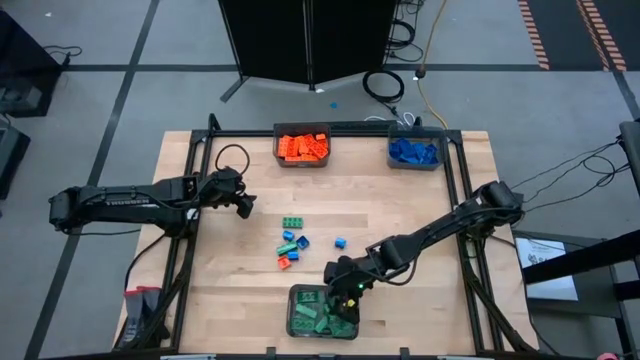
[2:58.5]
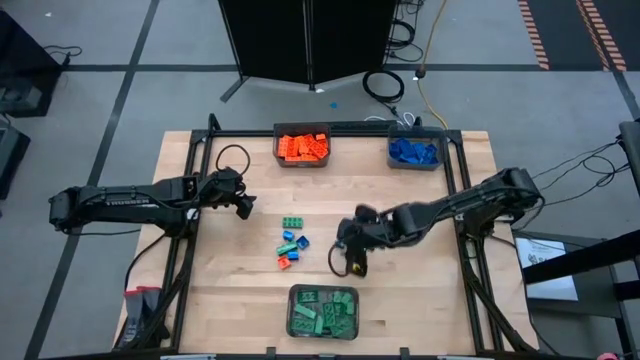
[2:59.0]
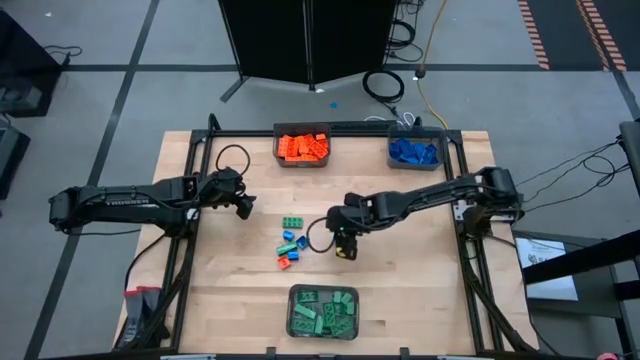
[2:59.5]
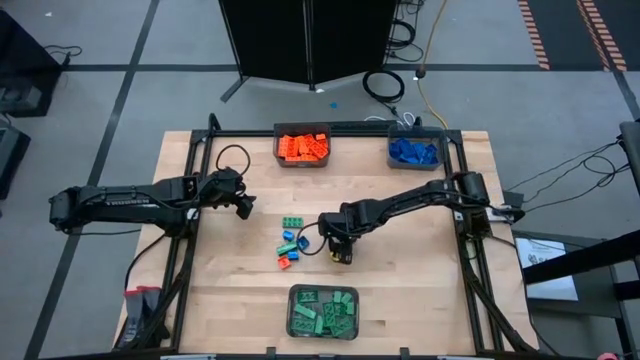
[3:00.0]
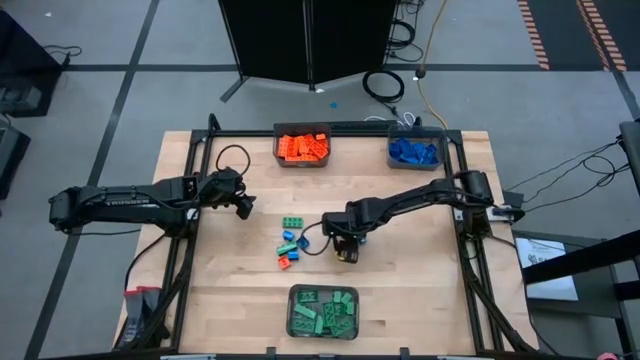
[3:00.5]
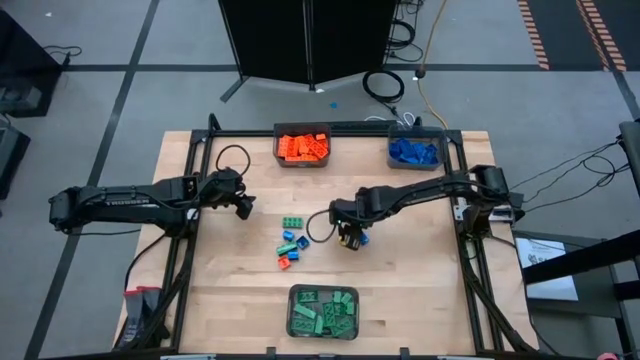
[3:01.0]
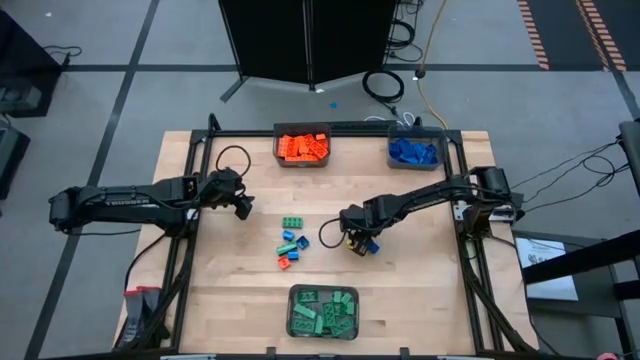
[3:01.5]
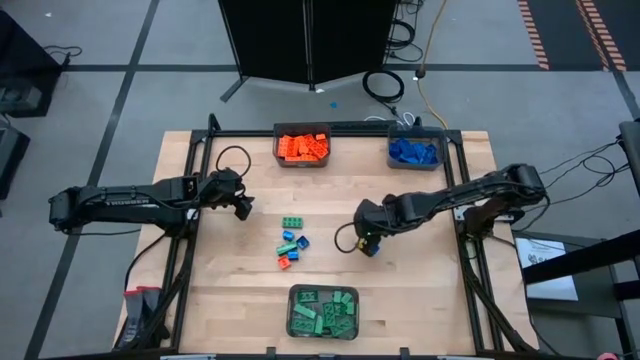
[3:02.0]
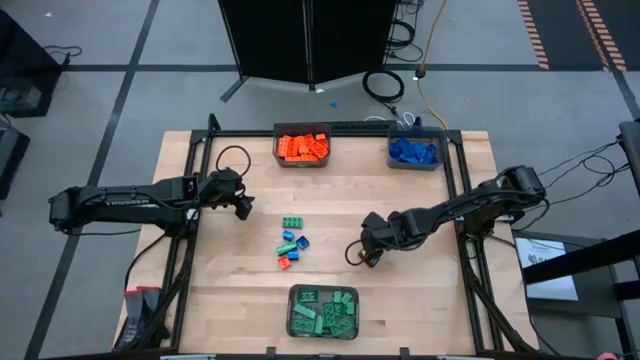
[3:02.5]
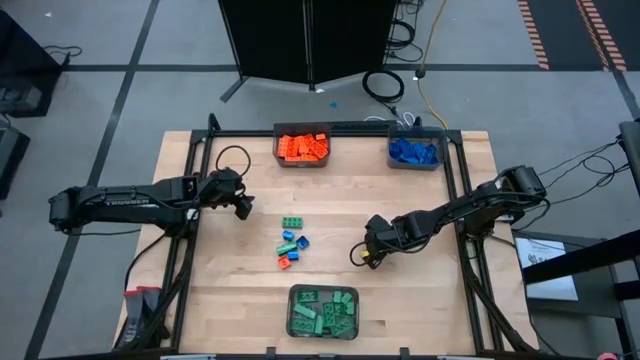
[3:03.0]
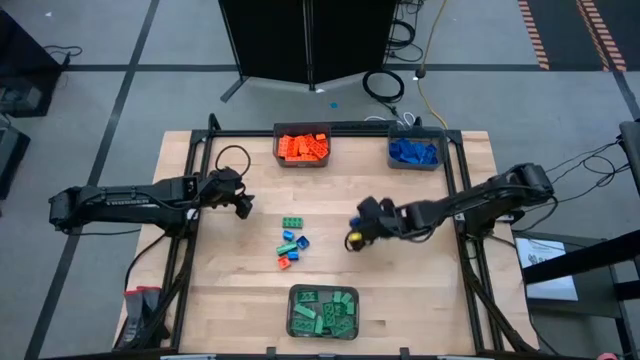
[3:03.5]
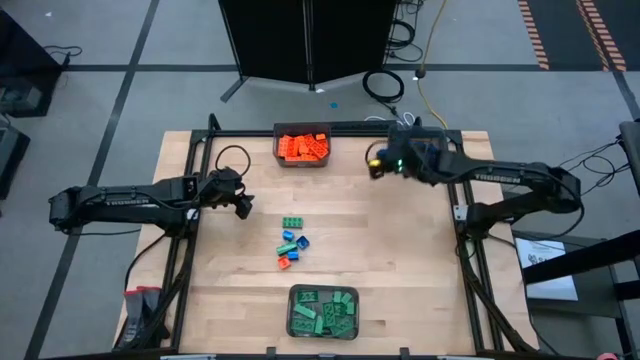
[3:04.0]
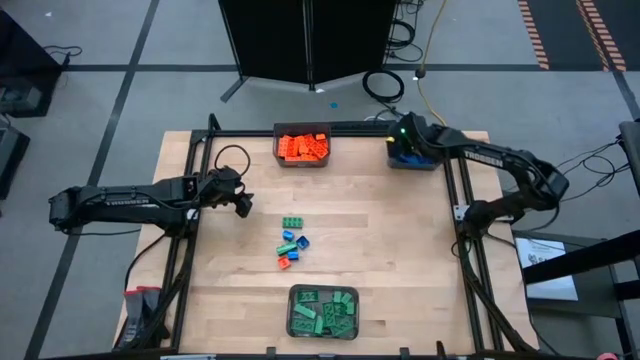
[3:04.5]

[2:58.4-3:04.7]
Task: Sort blocks
Put the blue game piece into the top right black bin

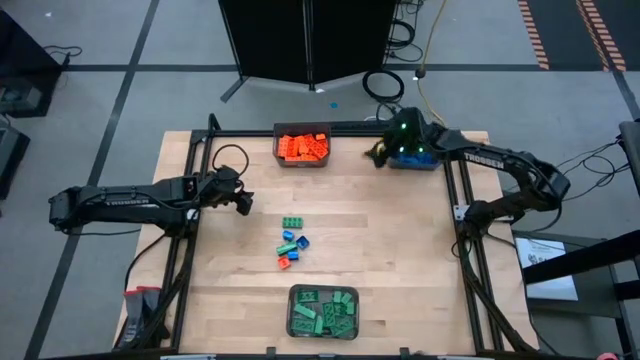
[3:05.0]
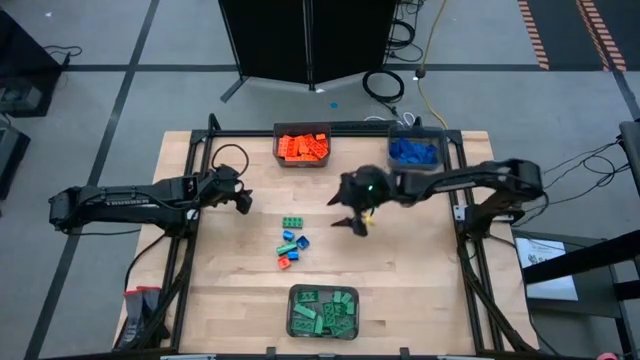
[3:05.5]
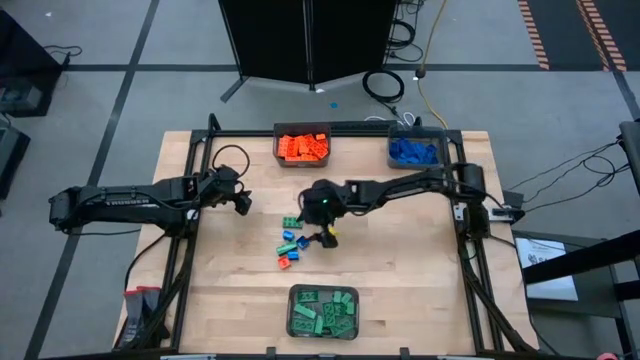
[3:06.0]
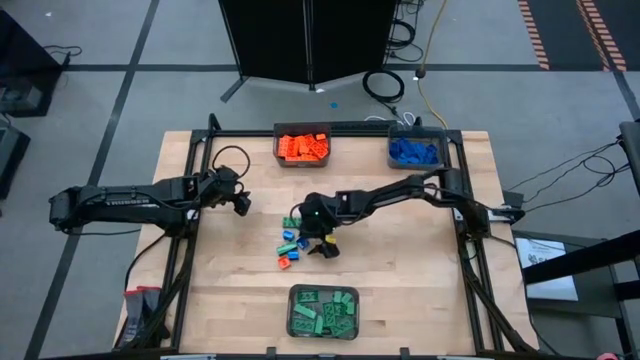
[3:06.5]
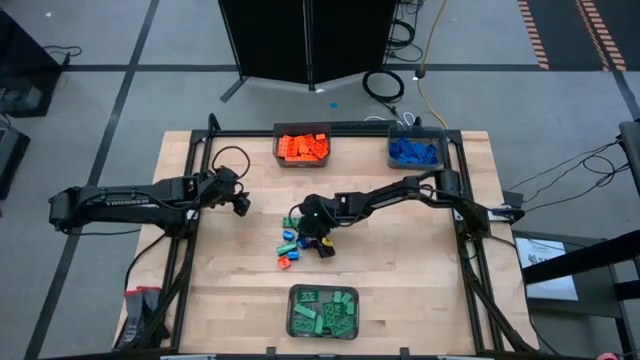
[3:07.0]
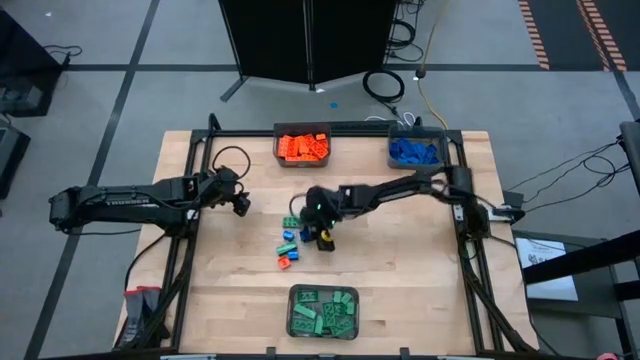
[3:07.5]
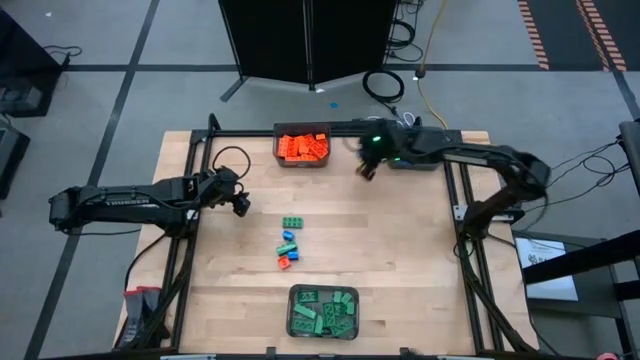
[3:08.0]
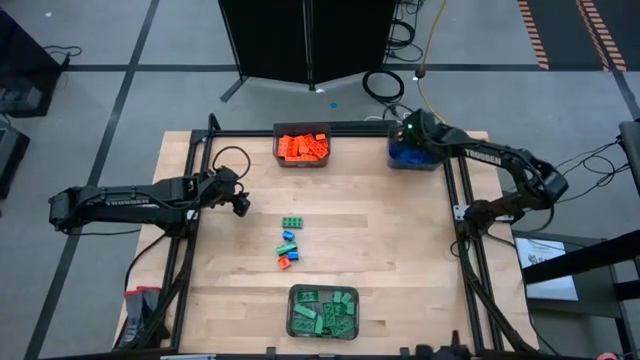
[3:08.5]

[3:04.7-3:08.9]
Put the blue game piece into the top right black bin

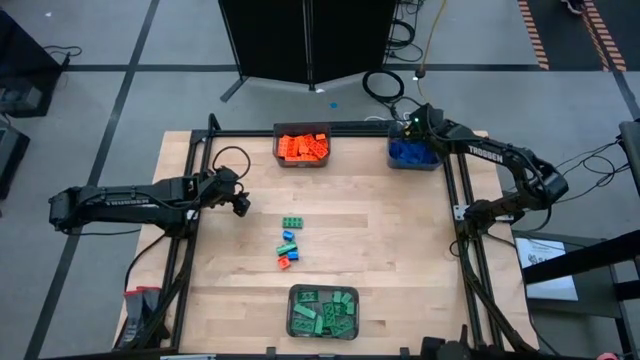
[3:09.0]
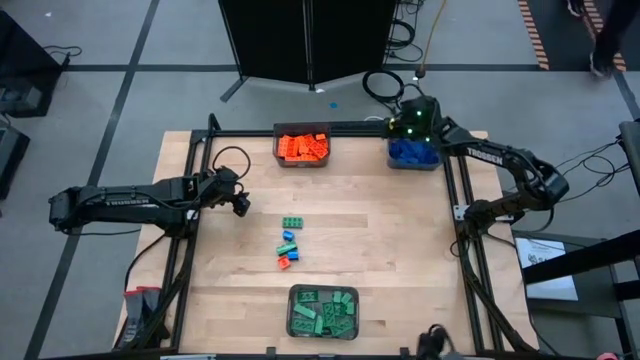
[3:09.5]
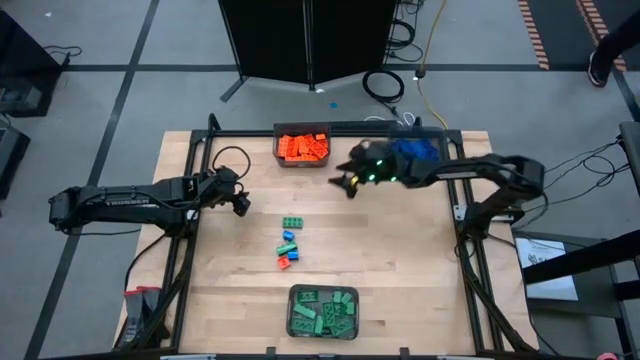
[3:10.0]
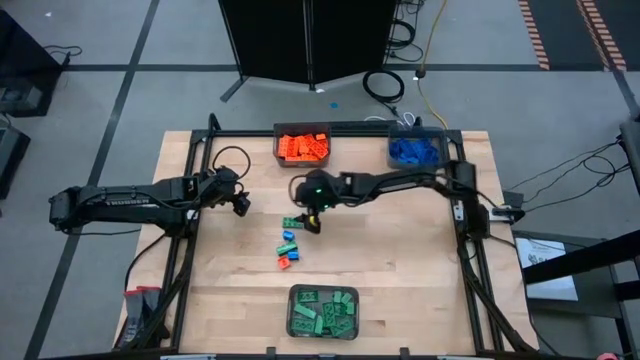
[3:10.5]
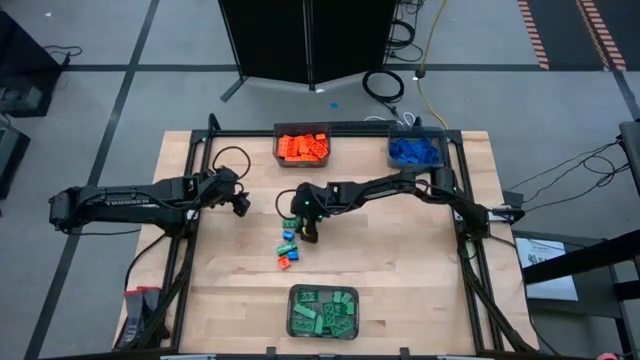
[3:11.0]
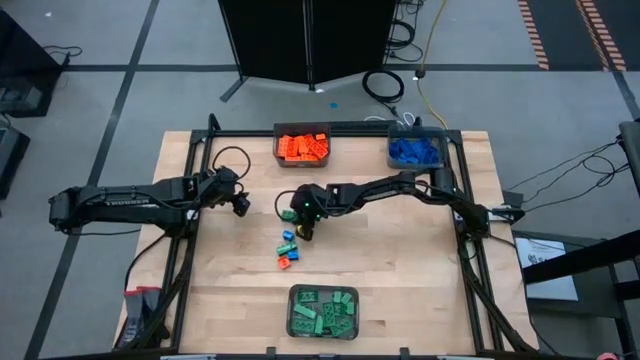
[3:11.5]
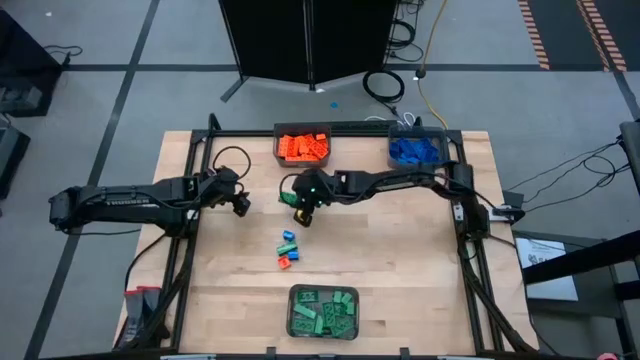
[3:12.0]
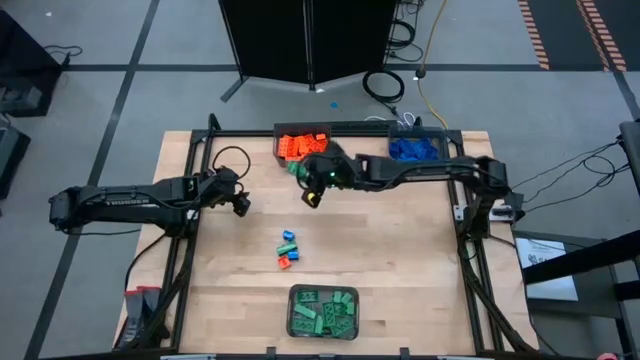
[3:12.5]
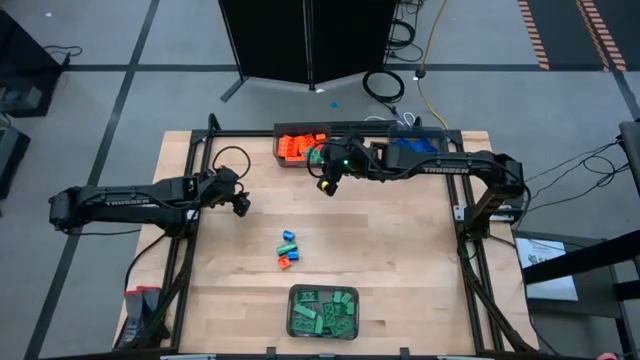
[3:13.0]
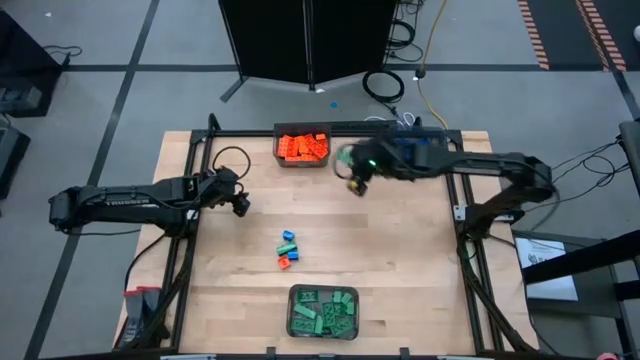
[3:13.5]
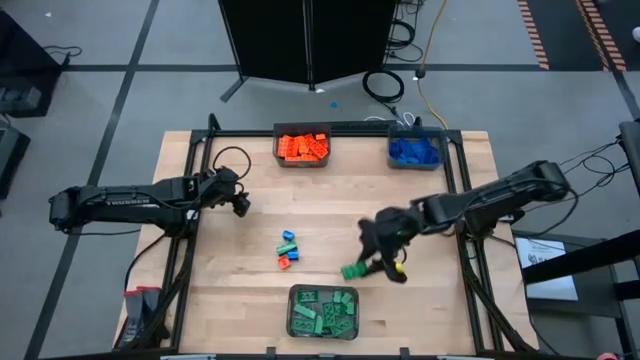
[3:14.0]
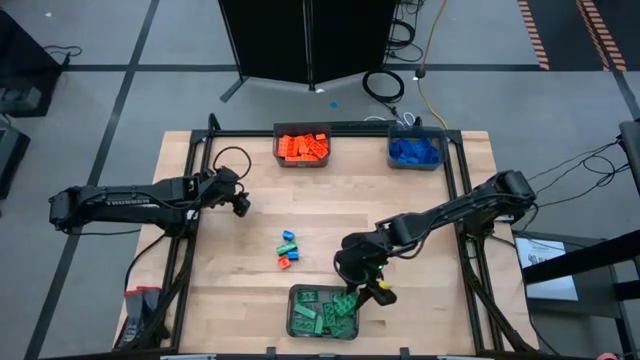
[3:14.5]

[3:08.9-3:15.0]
Put the green game piece into the bottom black bin

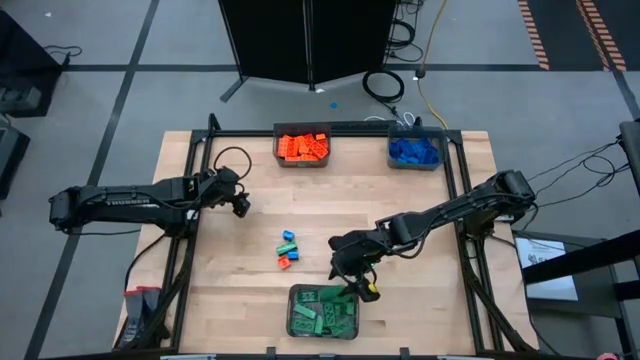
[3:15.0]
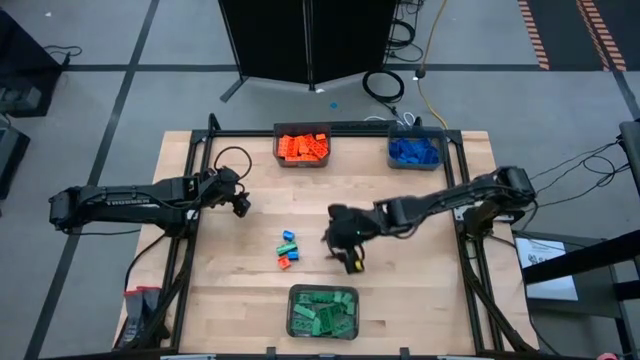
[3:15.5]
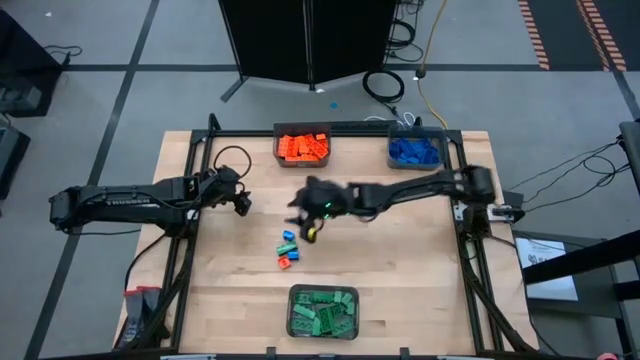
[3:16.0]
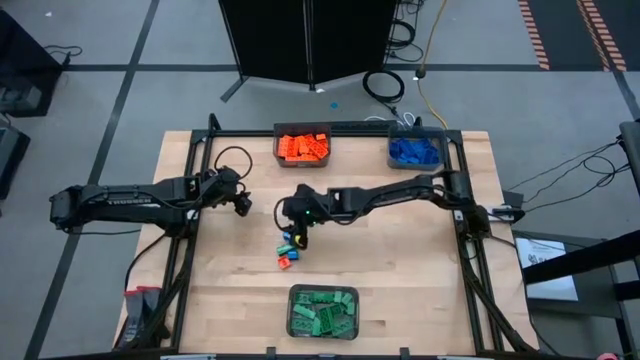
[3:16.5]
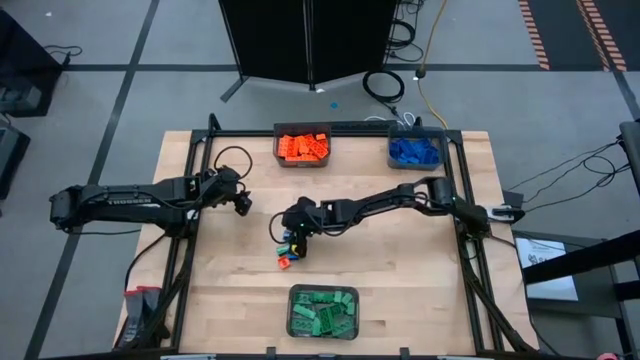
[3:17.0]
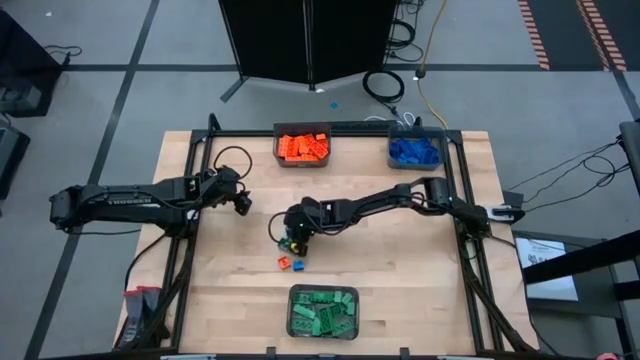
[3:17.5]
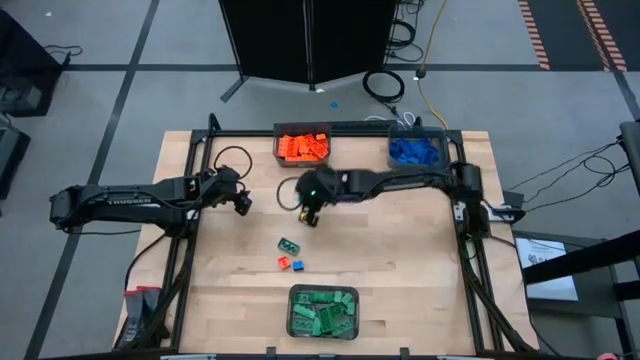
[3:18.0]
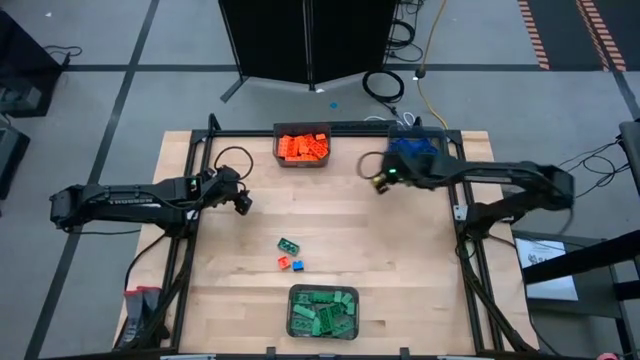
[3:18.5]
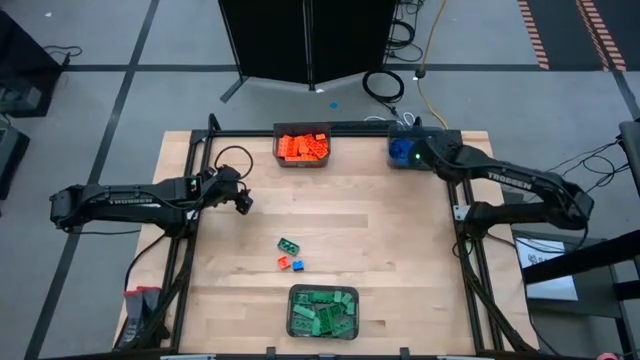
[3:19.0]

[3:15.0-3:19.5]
Put the blue game piece into the top right black bin
